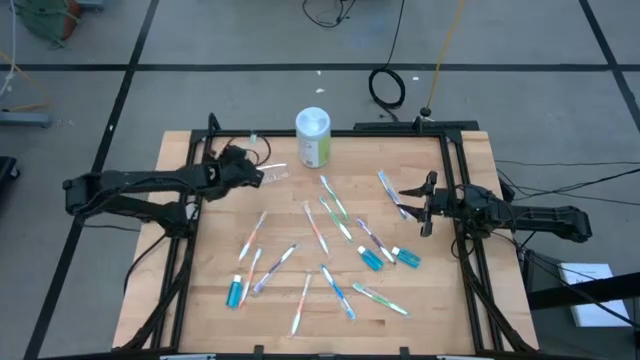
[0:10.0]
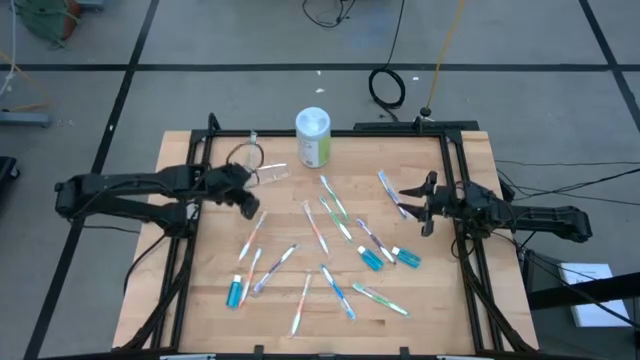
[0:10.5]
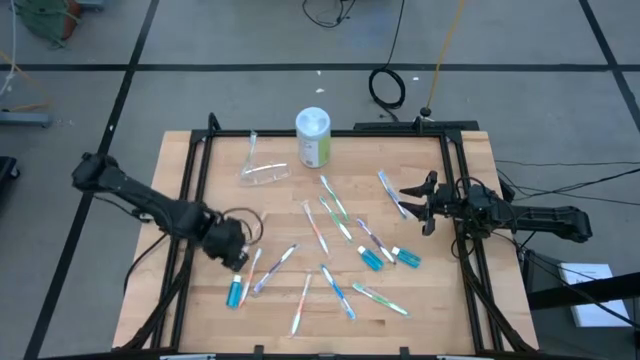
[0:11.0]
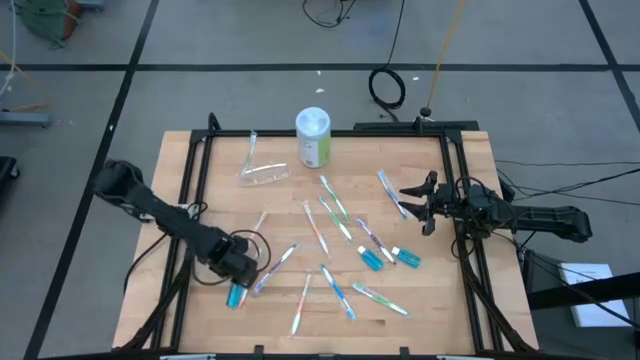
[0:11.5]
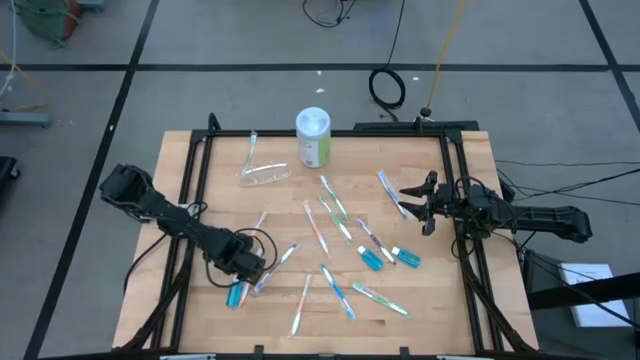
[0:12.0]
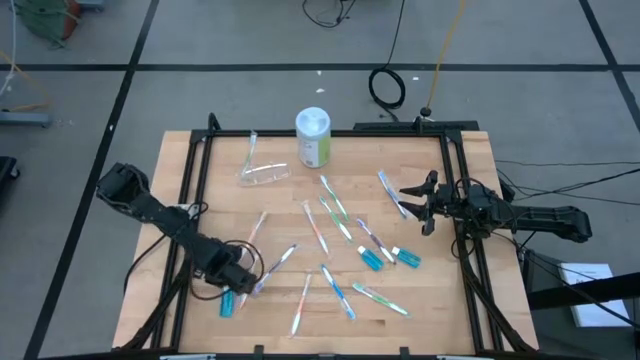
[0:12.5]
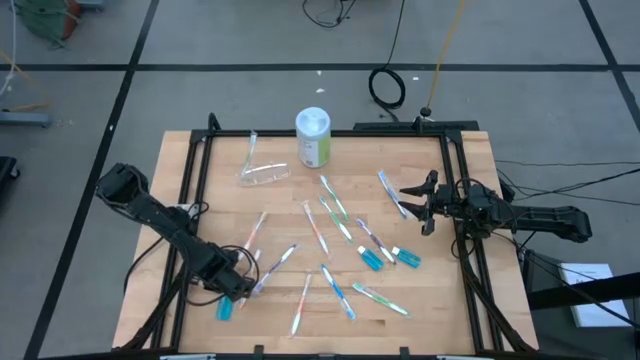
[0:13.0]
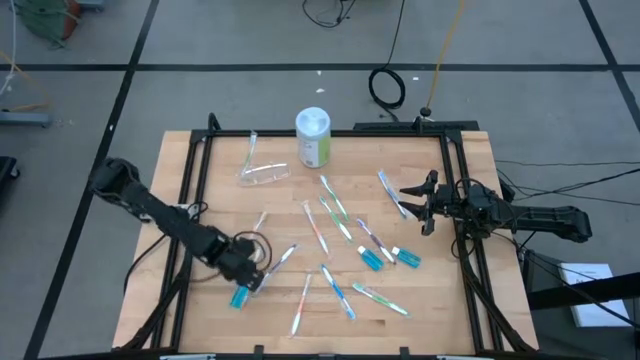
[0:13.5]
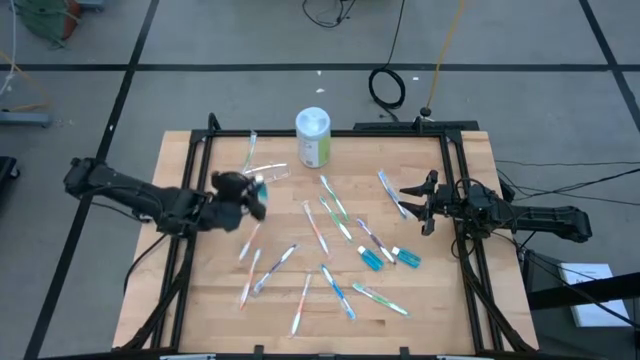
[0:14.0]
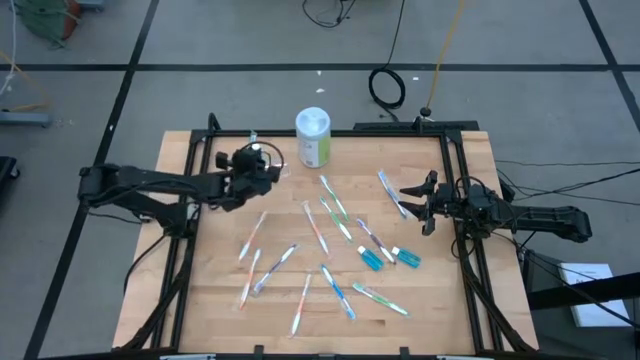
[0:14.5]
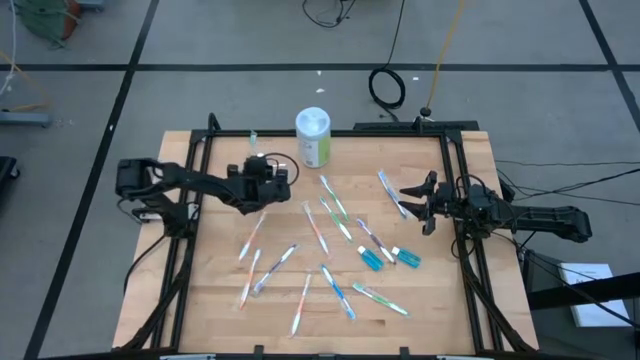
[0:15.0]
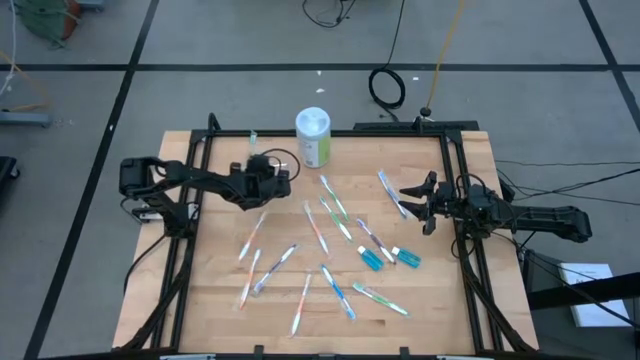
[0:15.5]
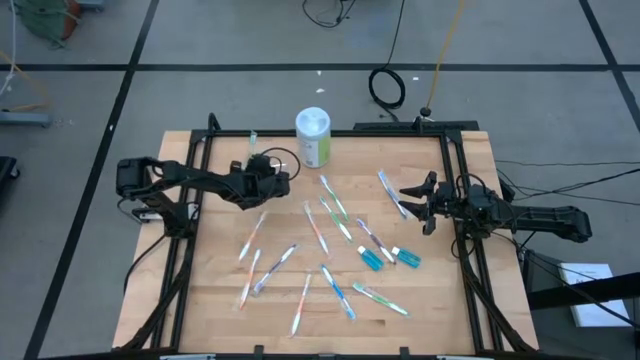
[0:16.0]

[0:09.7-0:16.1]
Task: Pick & Place toothbrushing station
Put the left mouthwash into the transparent organizer

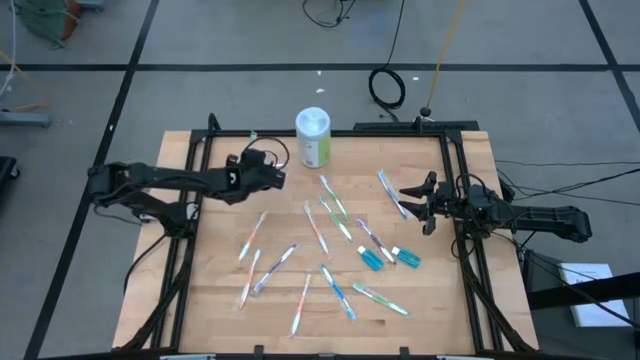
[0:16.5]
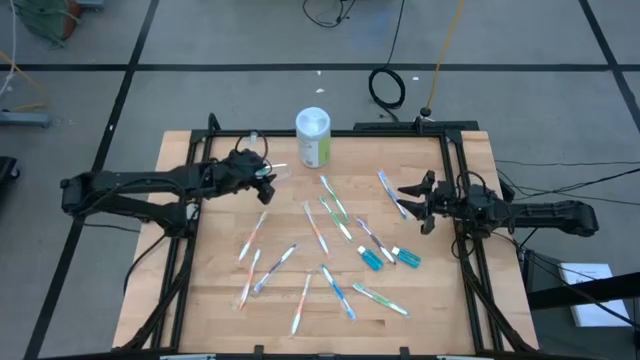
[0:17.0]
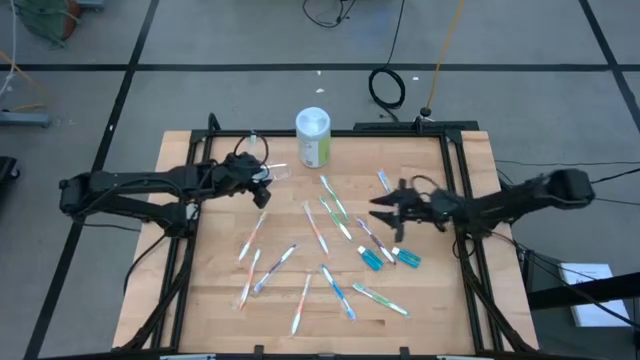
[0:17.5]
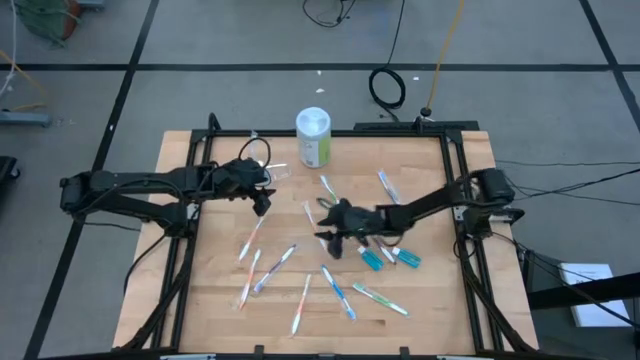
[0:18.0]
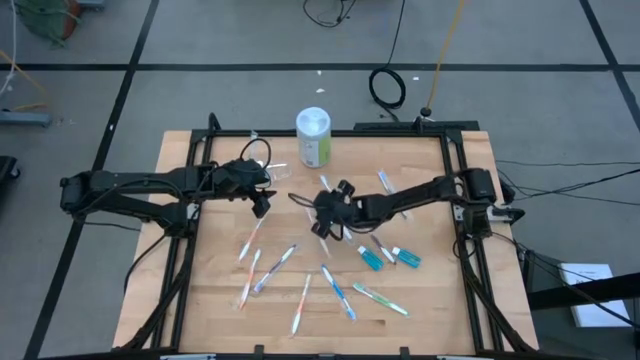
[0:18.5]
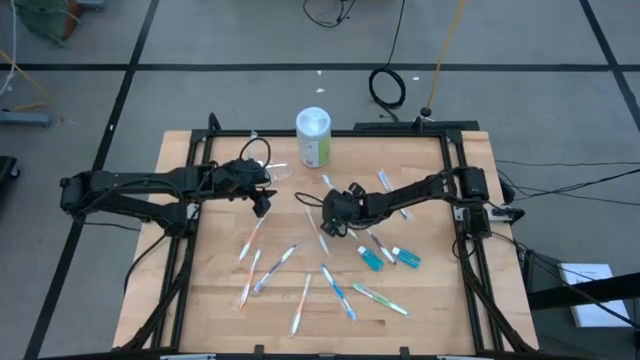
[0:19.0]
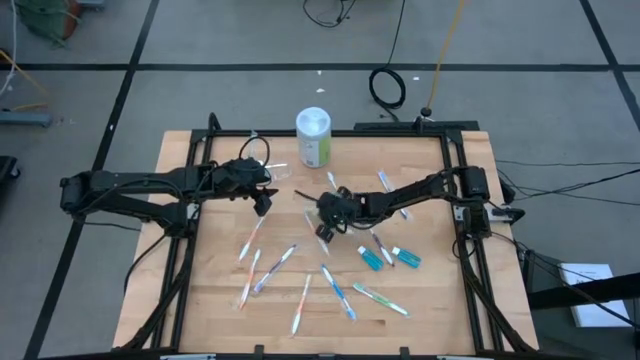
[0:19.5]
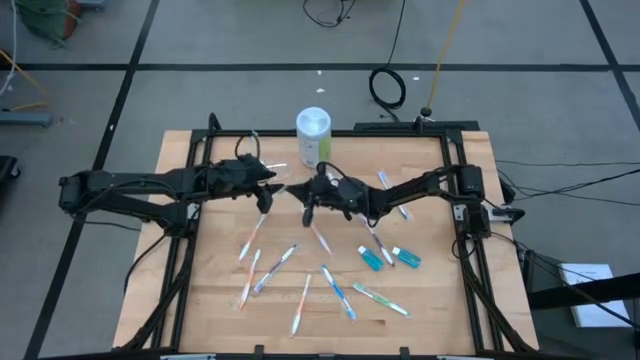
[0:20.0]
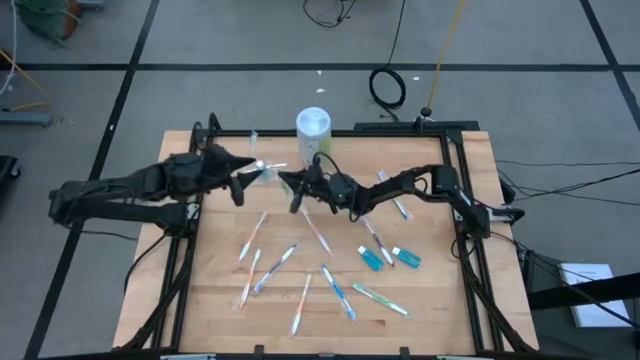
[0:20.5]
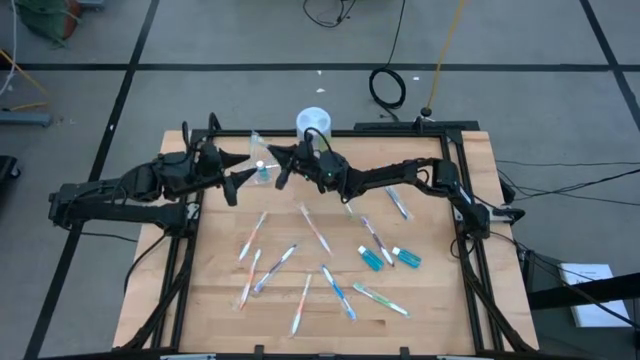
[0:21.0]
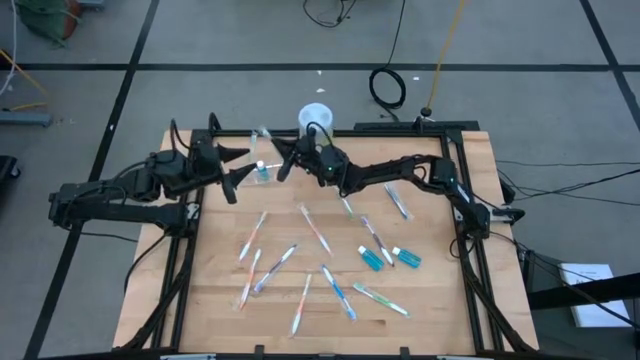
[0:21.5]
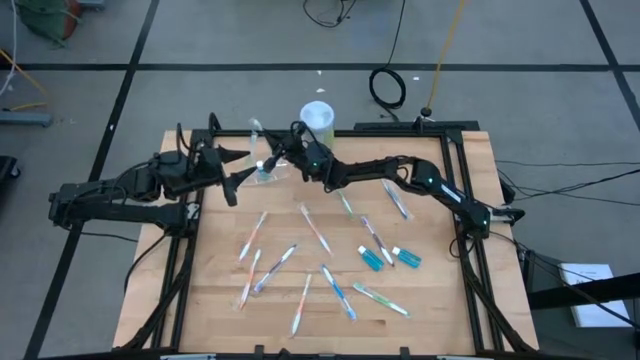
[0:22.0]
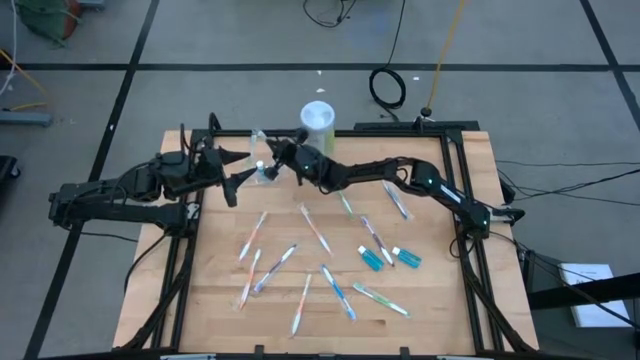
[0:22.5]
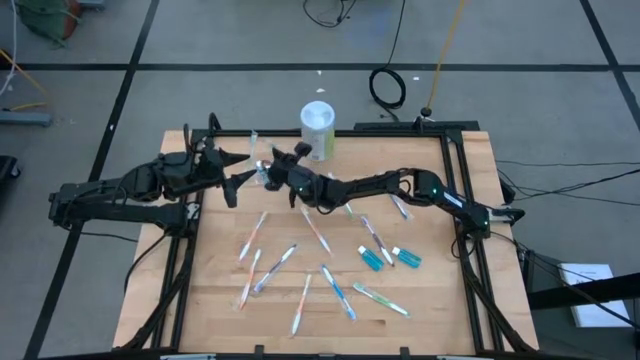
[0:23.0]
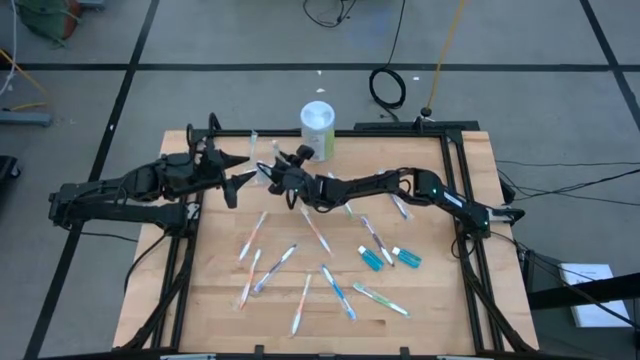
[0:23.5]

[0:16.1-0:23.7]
Put the middle green toothbrush into the transparent organizer

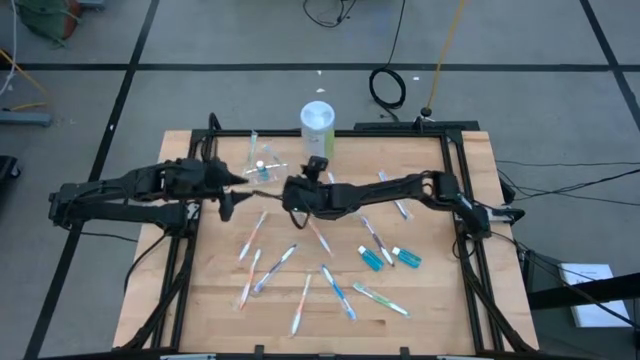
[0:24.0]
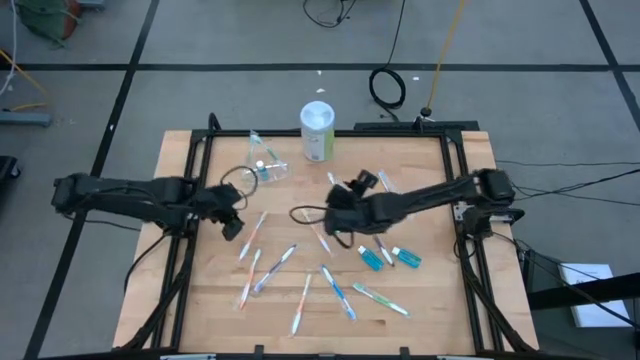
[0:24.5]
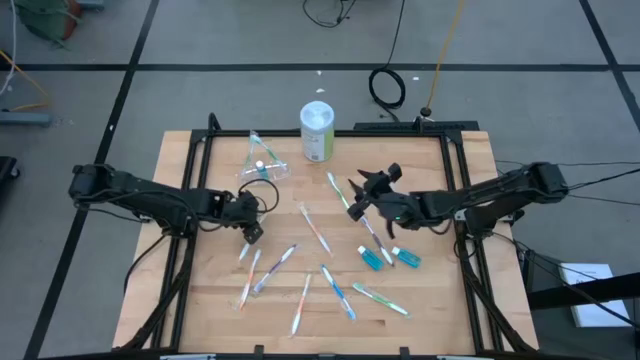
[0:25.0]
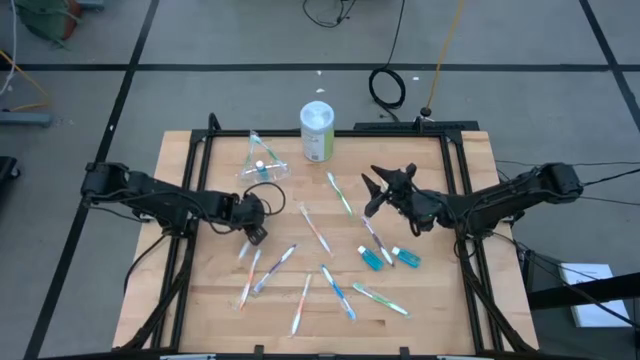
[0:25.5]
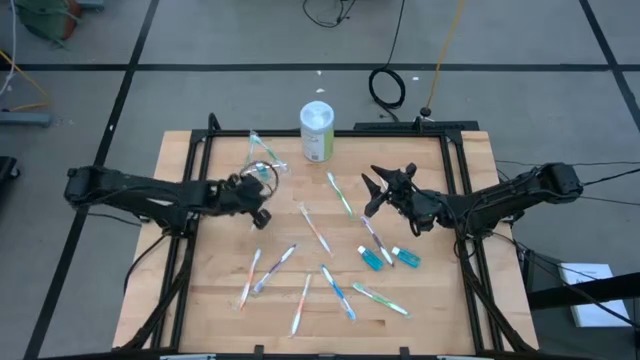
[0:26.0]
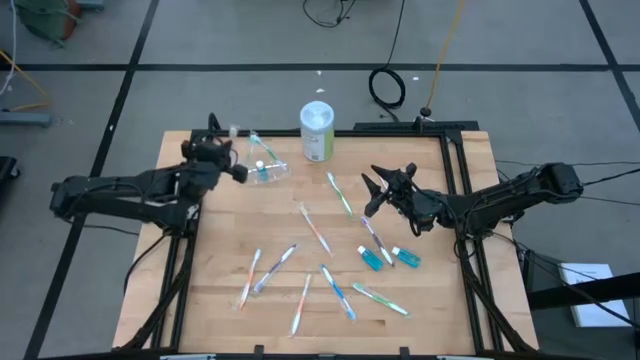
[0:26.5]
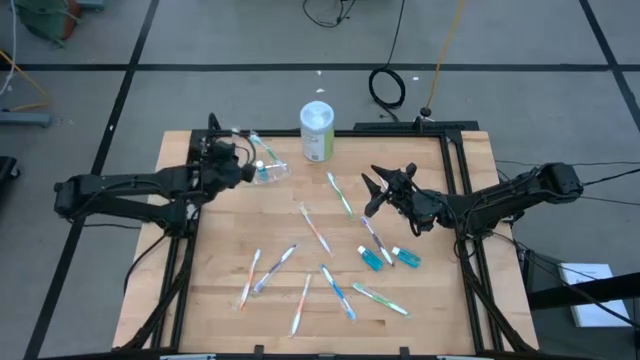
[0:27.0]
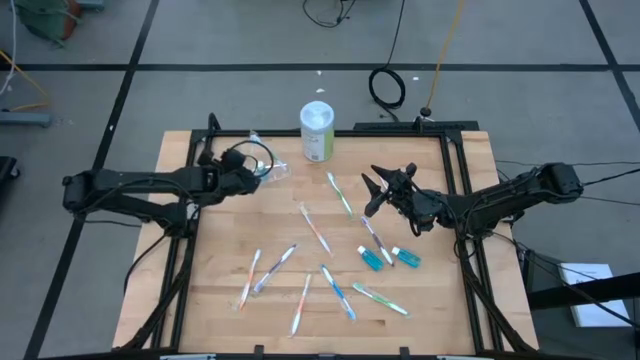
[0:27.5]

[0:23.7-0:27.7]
Put the orange toothbrush into the transparent organizer

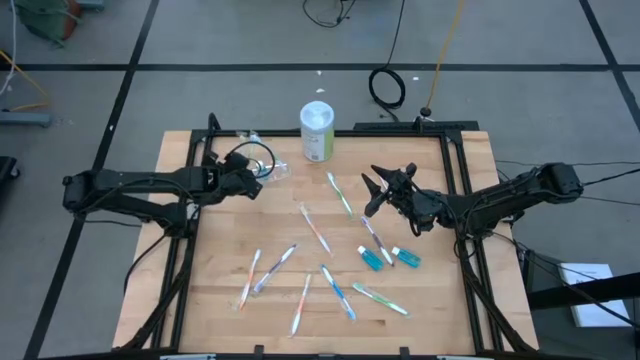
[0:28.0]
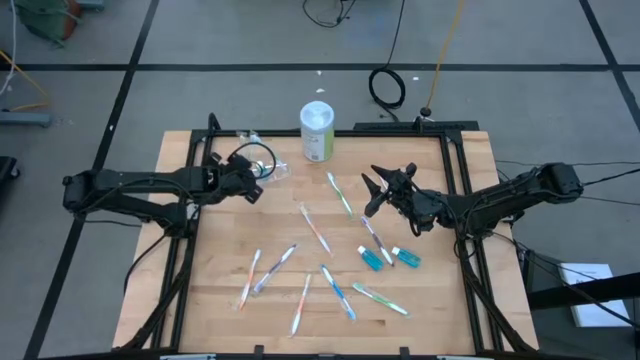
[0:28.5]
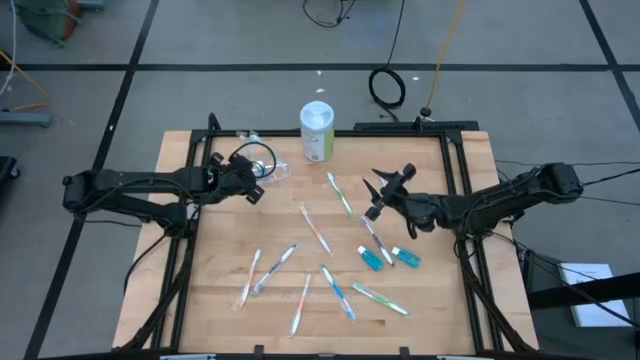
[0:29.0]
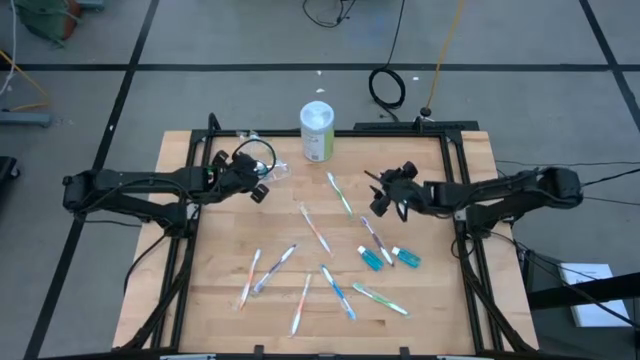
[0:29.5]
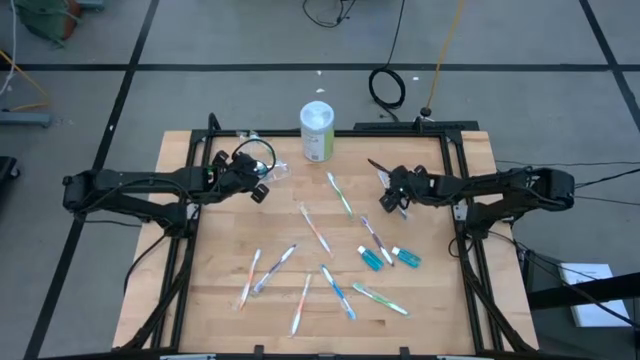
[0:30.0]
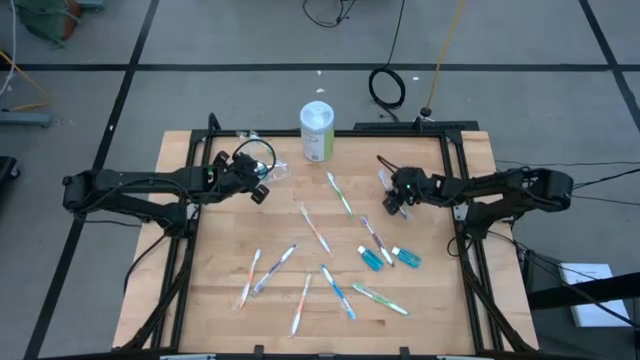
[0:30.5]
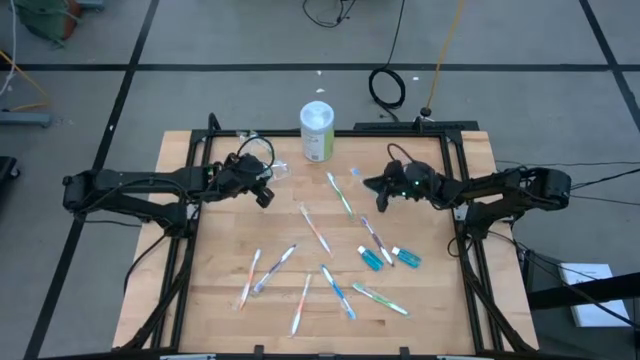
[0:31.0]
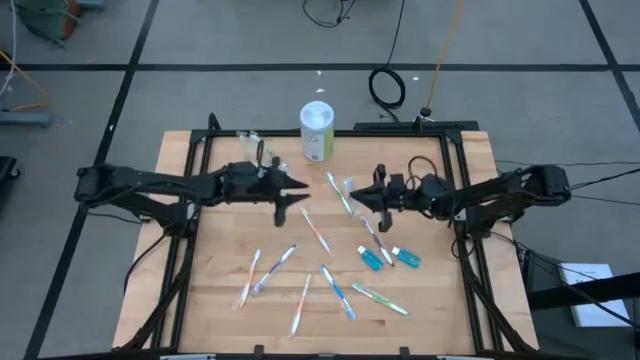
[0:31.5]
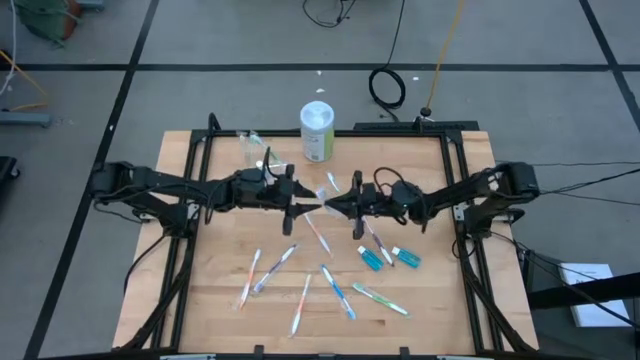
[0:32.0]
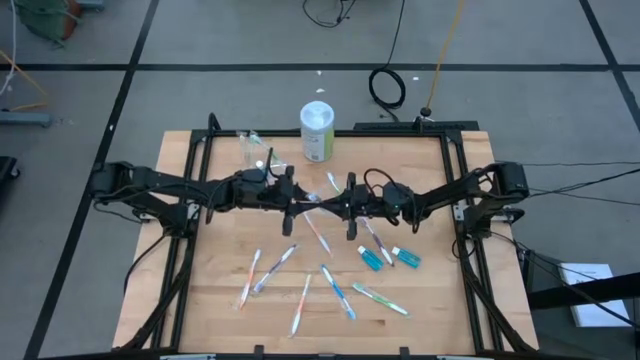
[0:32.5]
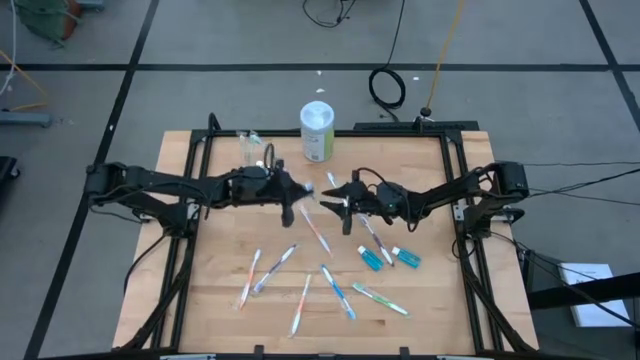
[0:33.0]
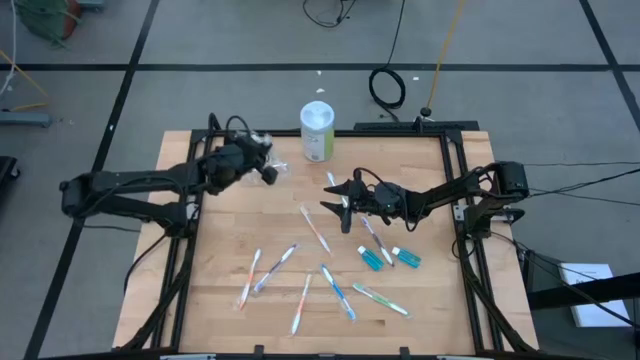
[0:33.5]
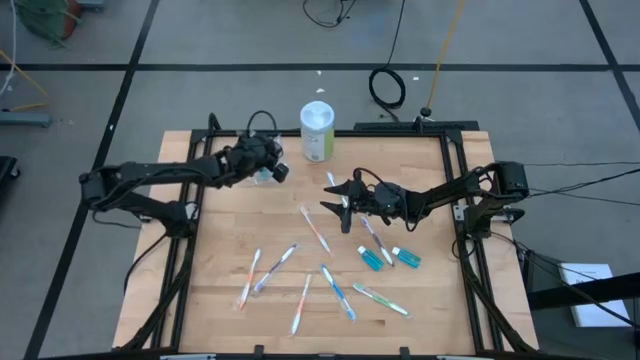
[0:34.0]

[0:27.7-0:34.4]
Put the top blue toothbrush into the transparent organizer
